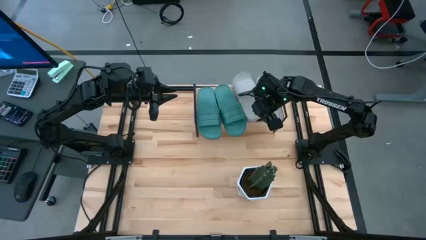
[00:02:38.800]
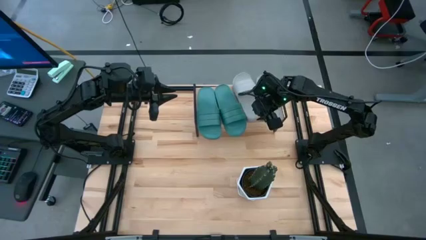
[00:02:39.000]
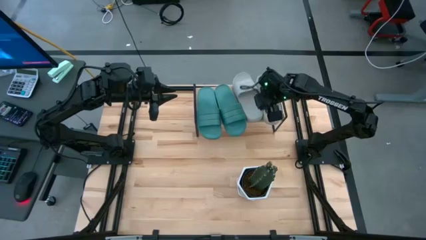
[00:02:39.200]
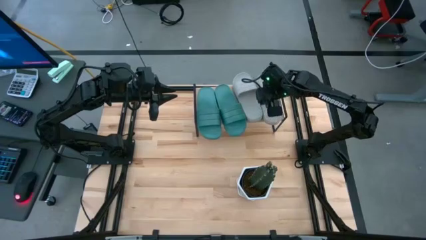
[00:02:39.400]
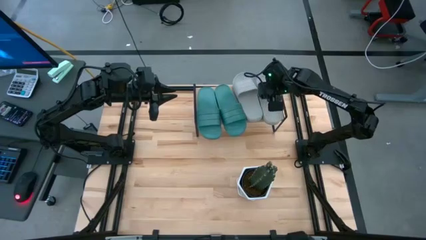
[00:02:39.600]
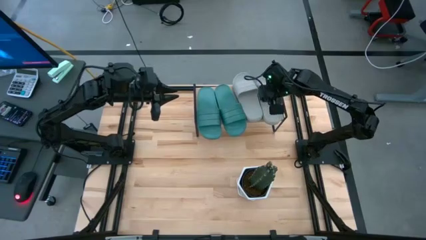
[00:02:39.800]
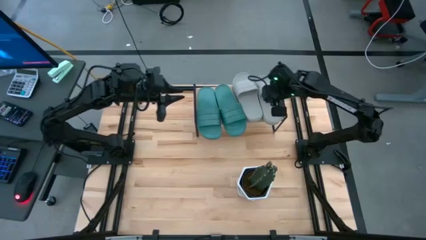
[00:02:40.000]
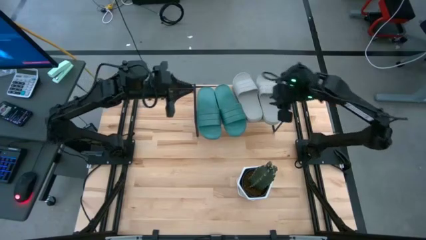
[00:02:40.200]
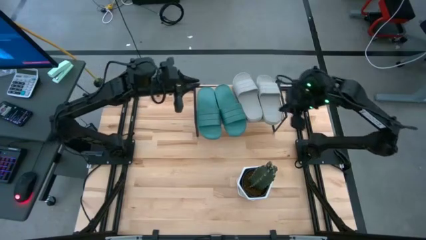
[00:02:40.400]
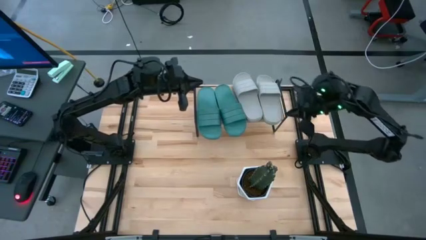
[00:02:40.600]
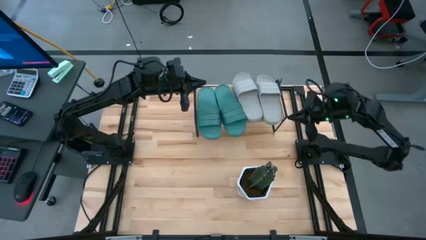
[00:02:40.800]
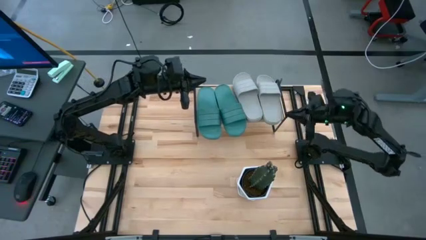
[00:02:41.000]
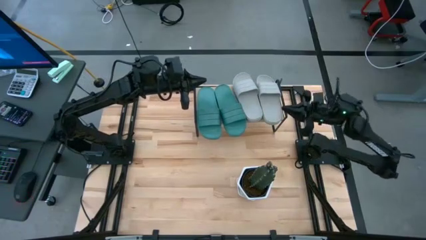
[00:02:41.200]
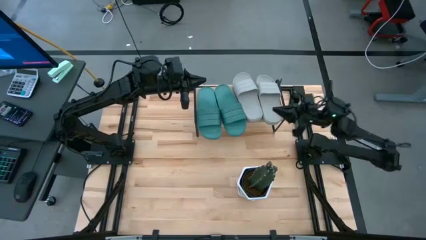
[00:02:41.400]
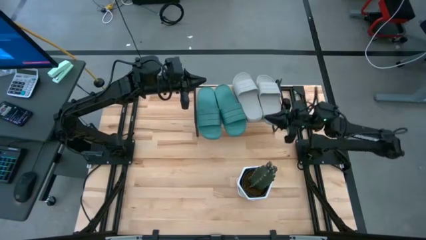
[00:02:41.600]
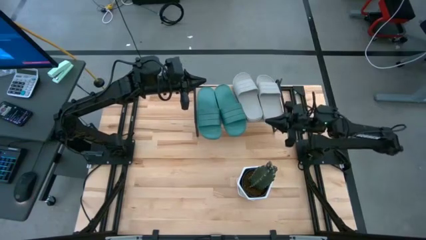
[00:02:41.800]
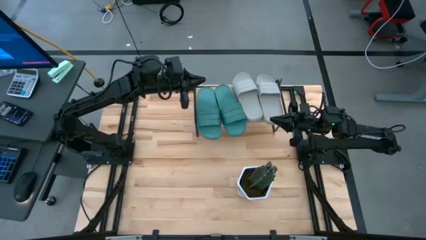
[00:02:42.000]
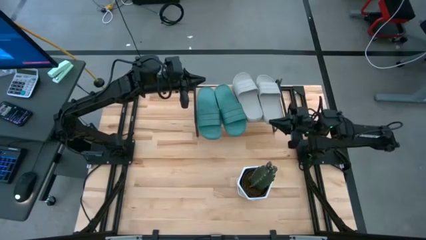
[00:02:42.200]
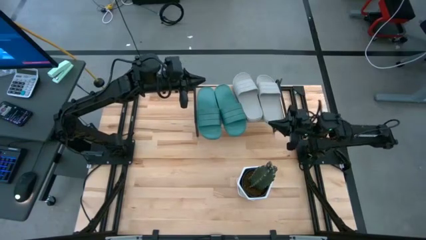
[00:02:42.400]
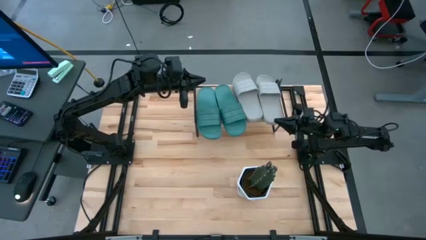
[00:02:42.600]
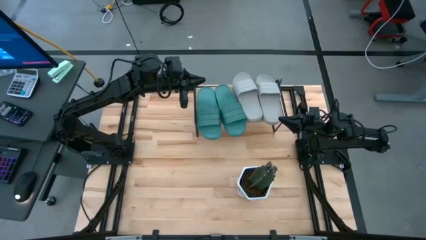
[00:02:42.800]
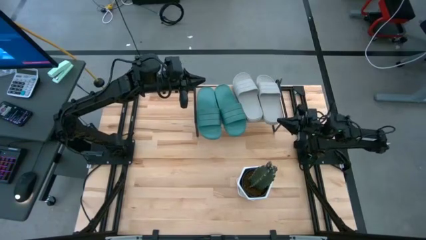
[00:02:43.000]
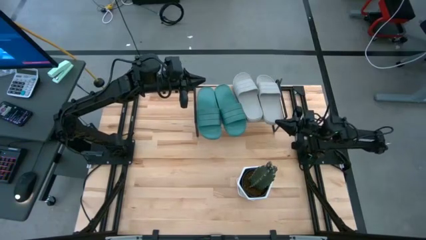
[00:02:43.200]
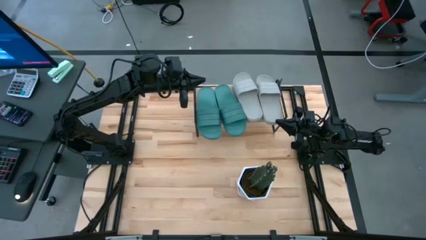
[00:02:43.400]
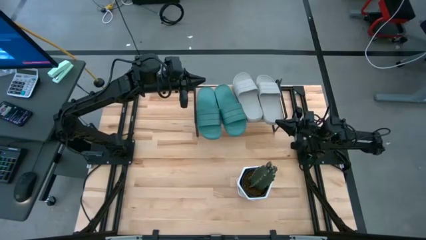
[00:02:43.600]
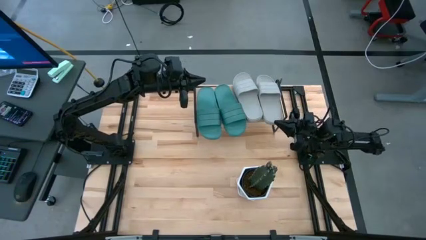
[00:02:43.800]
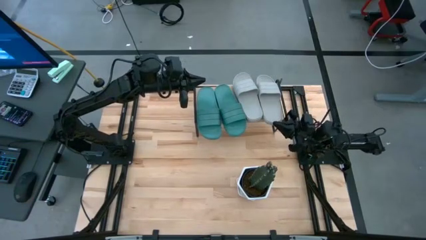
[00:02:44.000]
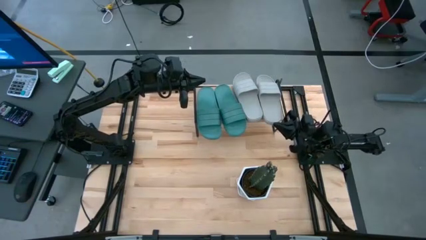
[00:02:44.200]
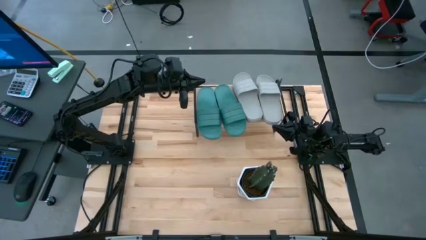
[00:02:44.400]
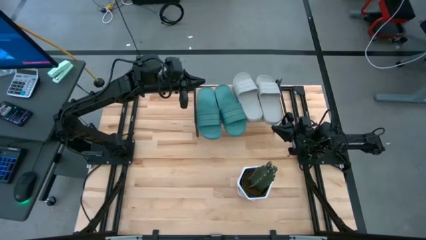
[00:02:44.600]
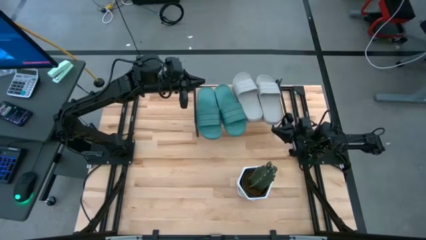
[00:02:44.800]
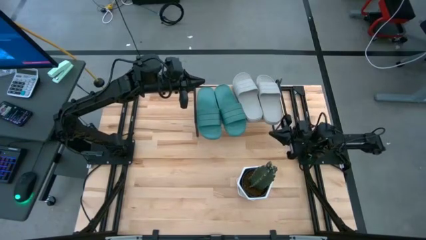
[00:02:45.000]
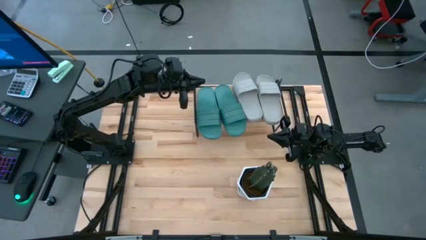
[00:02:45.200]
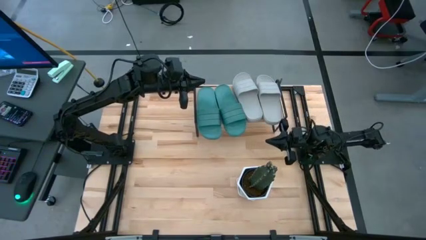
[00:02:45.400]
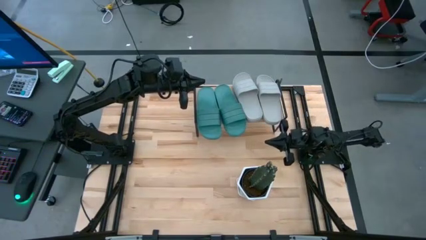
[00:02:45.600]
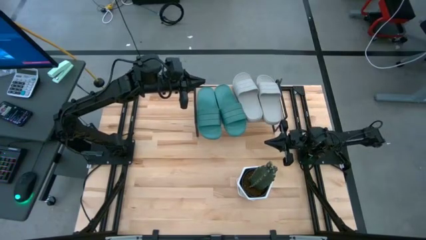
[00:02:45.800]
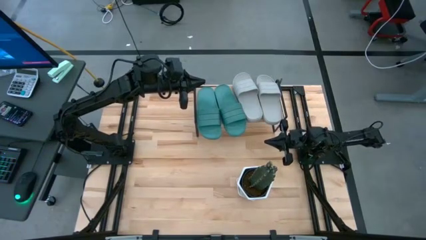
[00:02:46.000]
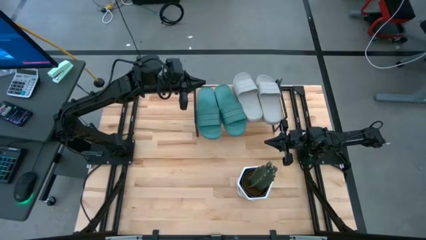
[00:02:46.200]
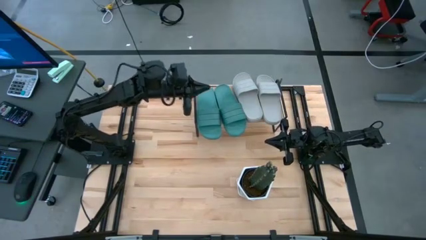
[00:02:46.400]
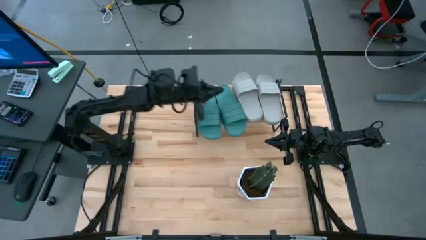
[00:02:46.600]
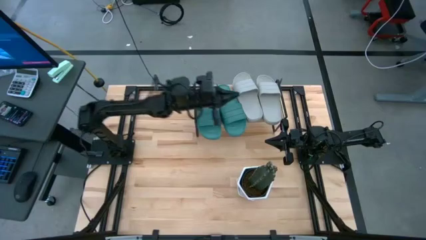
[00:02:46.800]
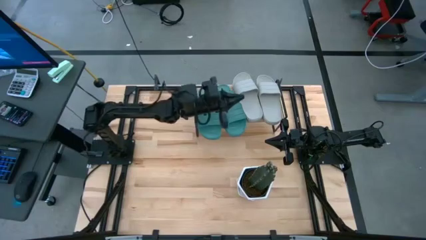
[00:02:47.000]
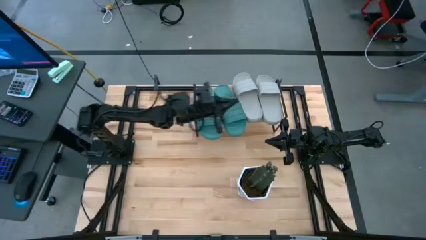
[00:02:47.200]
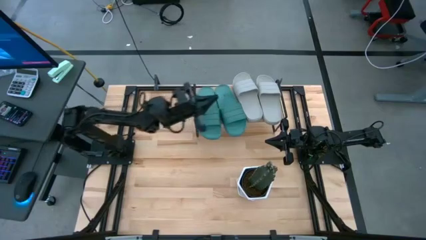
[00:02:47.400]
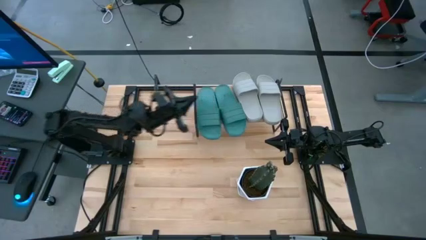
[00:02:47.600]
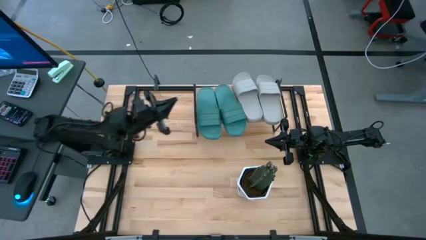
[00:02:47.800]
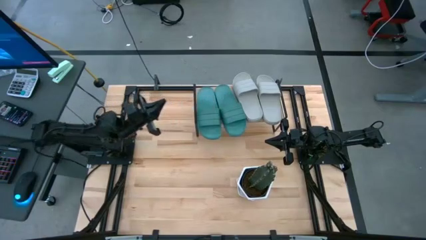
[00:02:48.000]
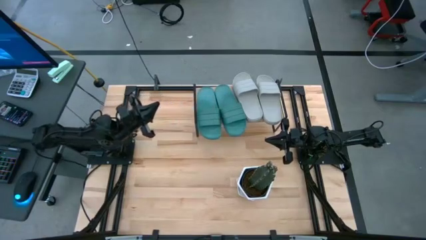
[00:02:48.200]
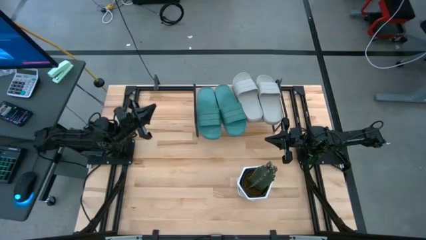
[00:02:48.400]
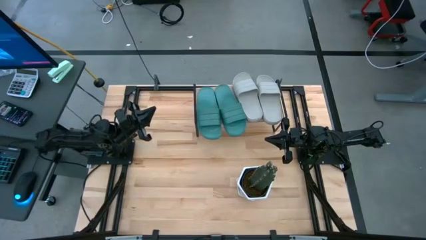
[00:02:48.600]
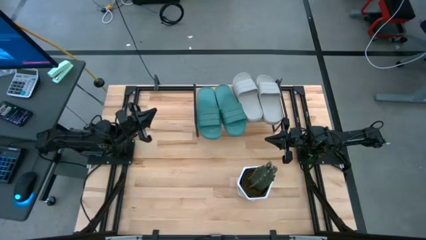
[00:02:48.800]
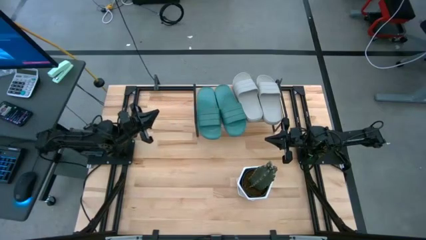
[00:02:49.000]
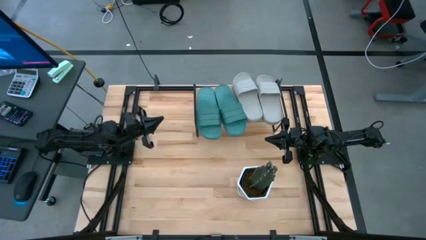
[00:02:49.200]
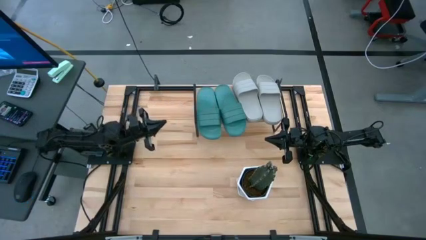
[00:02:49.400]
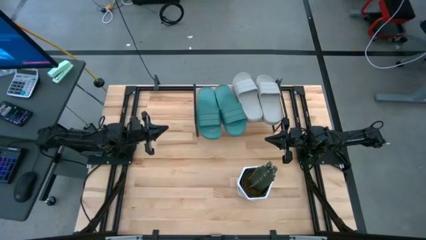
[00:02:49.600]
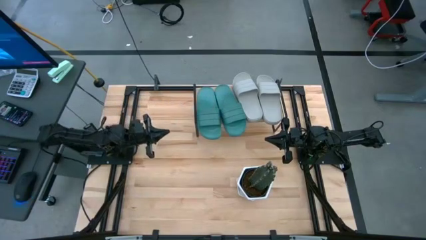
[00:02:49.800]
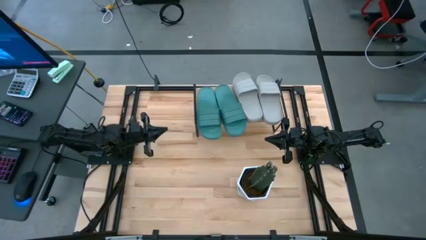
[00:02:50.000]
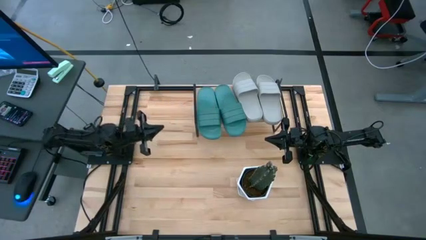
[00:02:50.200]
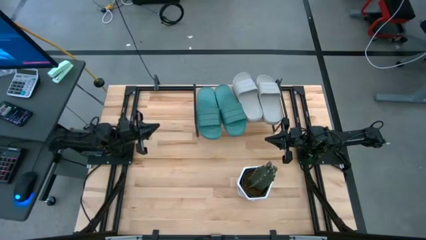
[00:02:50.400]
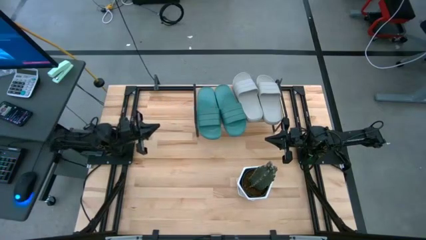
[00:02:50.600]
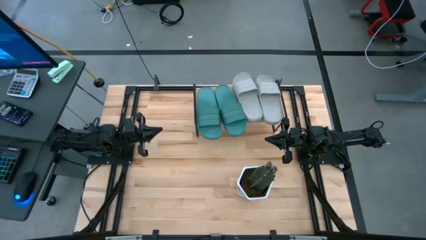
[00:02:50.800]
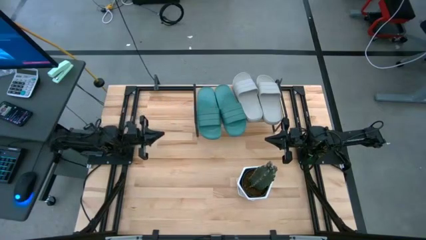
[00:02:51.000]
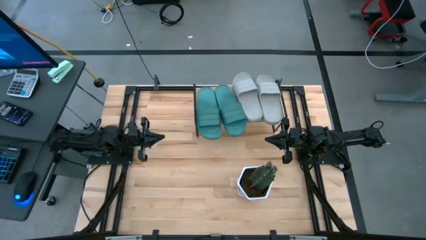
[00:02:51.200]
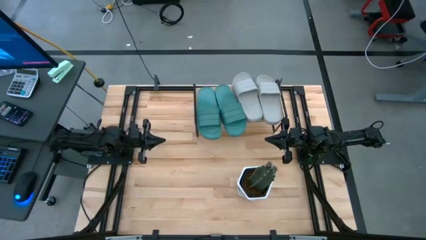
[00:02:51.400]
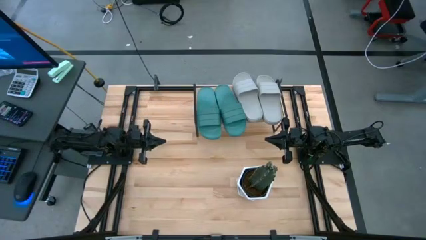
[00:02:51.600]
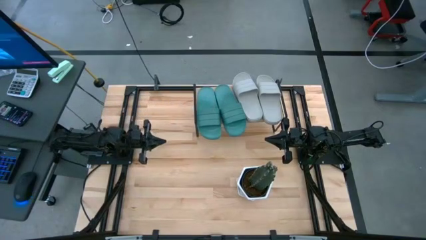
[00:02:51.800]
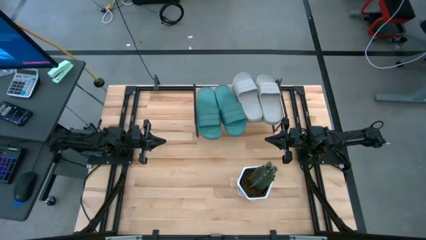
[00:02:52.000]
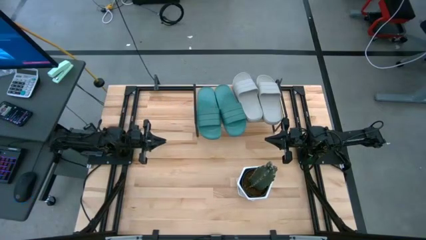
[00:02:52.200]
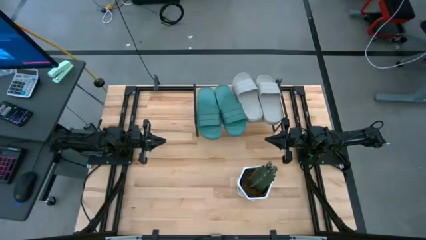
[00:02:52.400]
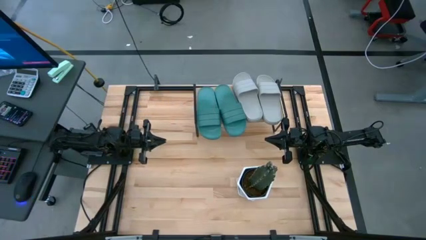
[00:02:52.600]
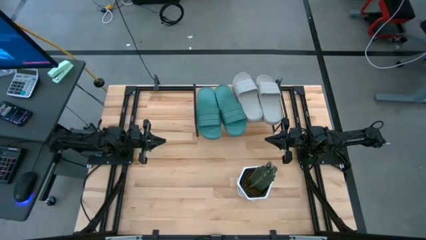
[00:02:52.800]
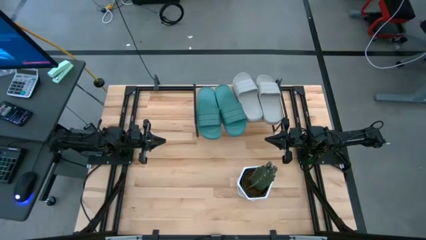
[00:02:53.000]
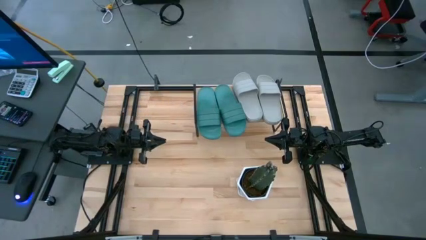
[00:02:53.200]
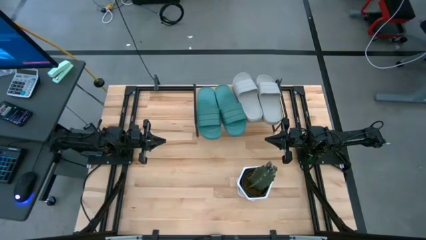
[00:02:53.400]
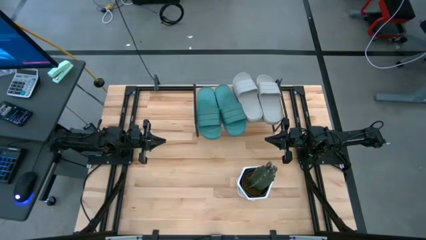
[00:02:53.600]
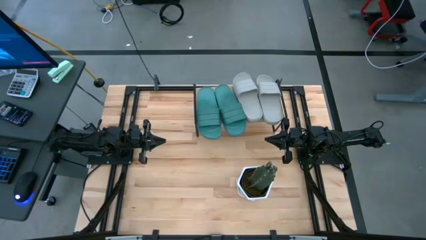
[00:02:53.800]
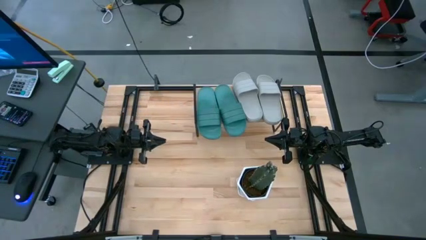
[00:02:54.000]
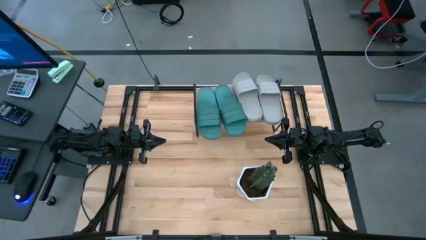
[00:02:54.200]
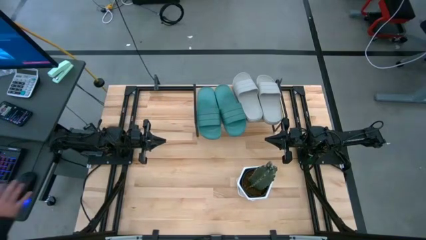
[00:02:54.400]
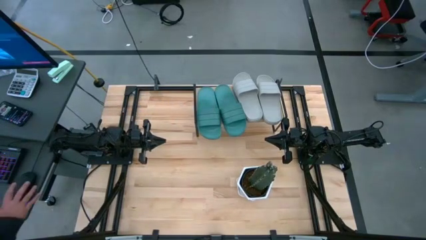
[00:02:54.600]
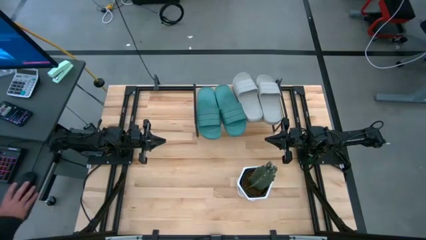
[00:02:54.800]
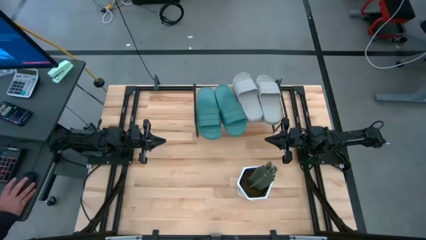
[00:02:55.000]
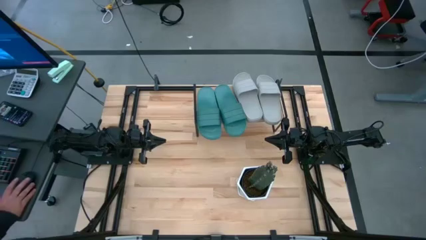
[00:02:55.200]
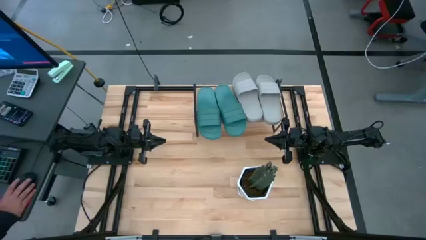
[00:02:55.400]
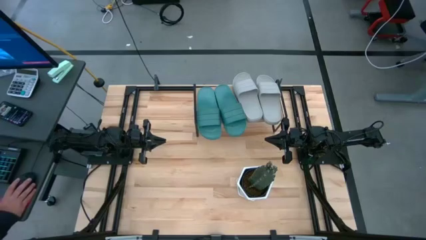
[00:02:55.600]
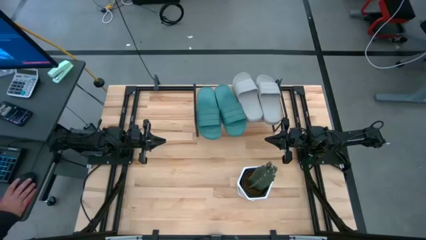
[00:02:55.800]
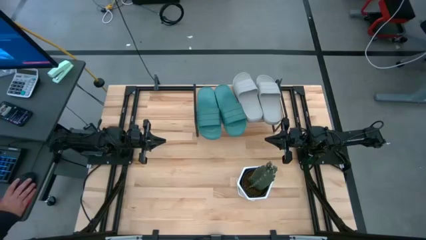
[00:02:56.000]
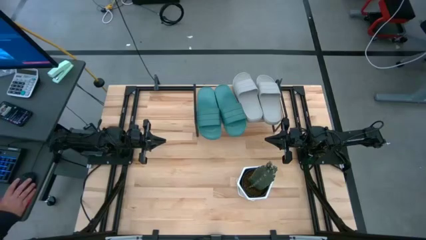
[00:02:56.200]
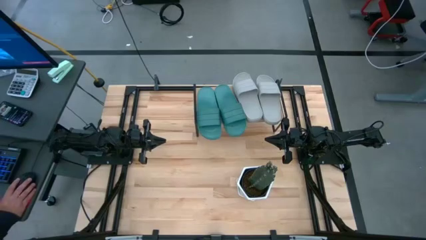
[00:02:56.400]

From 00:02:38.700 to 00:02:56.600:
Task: Pick and place slides into the shelf
Return to Home Position
